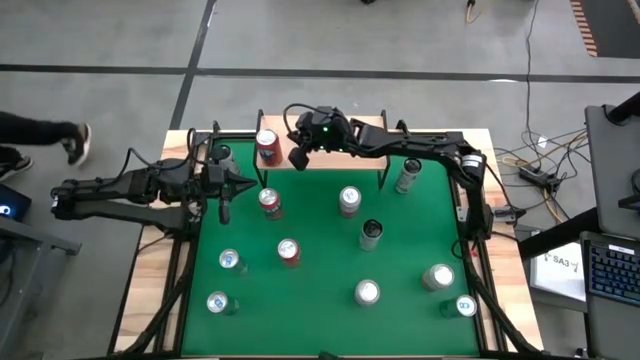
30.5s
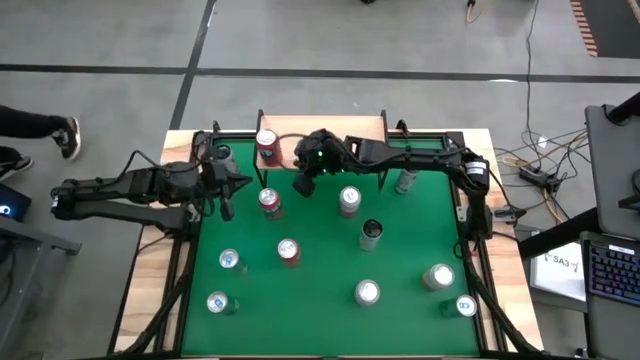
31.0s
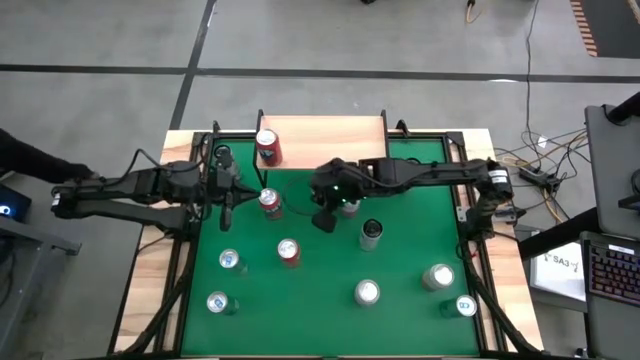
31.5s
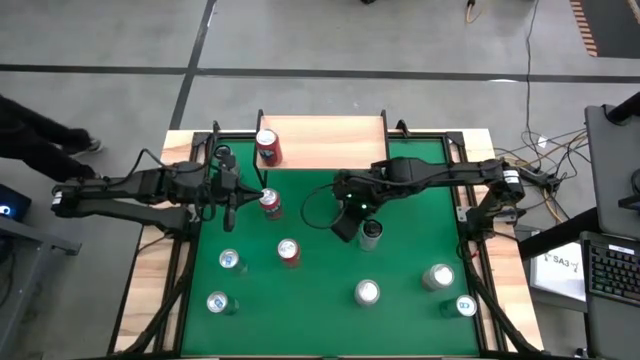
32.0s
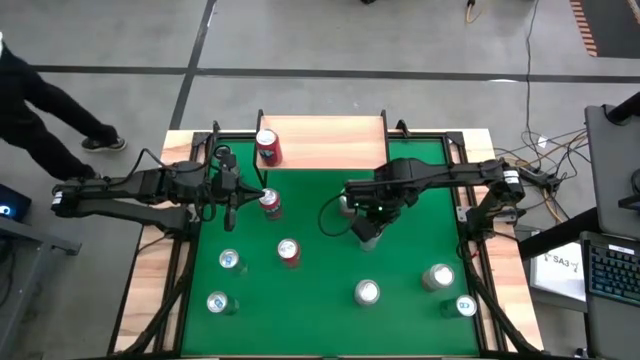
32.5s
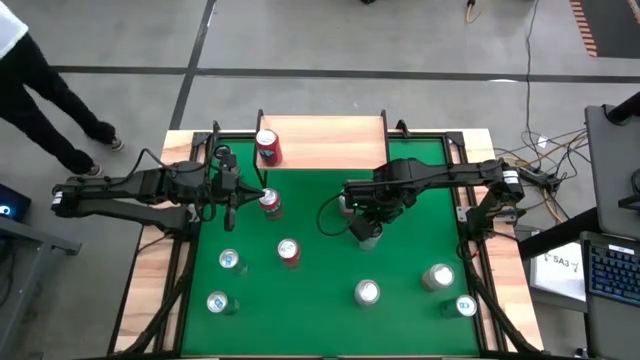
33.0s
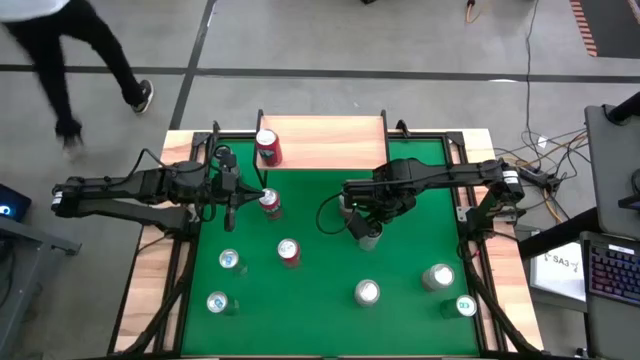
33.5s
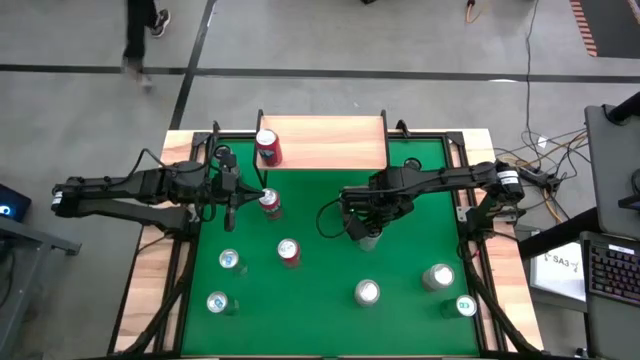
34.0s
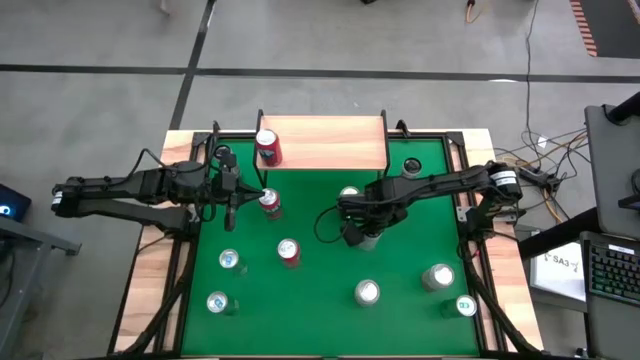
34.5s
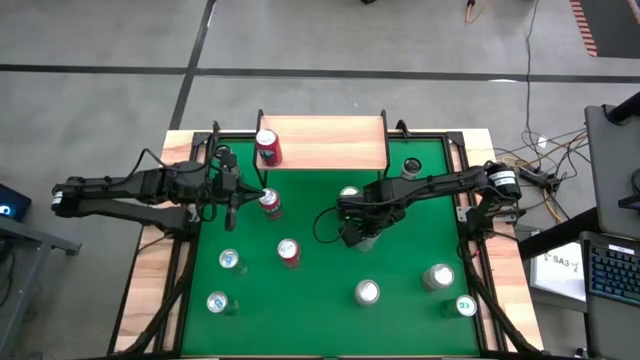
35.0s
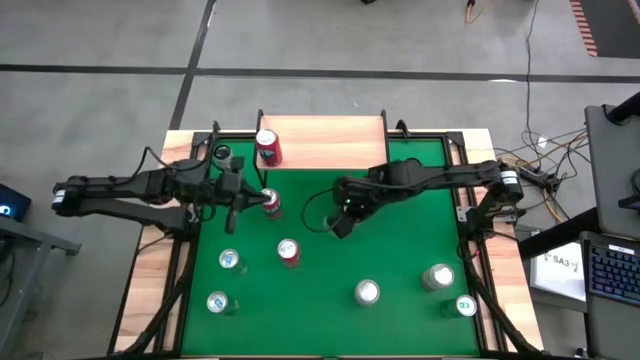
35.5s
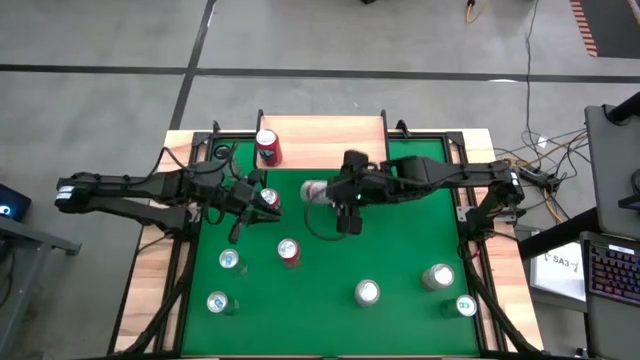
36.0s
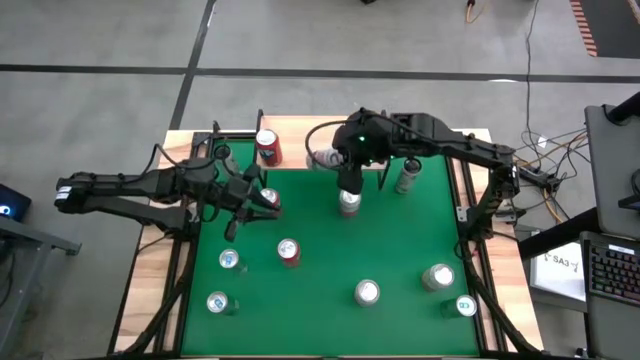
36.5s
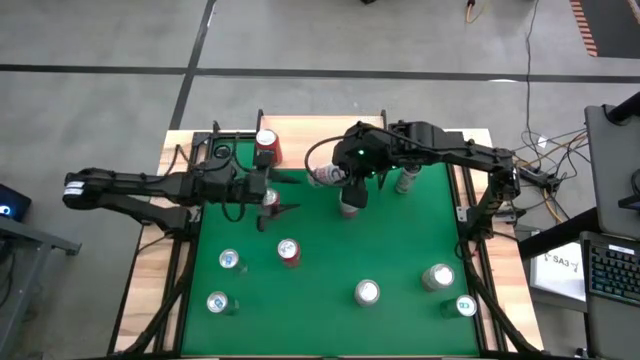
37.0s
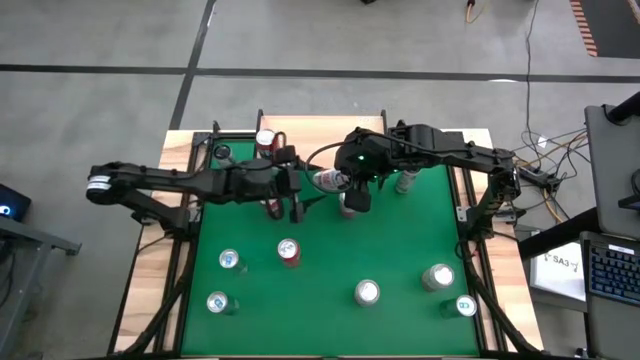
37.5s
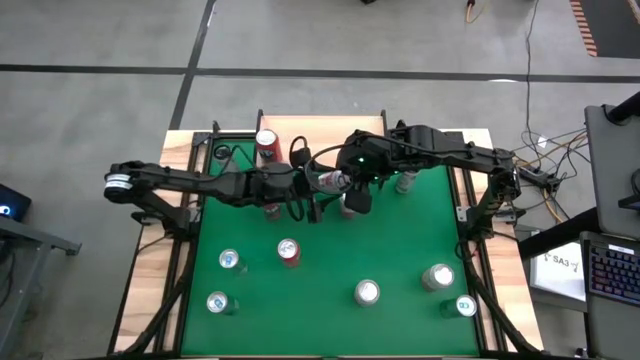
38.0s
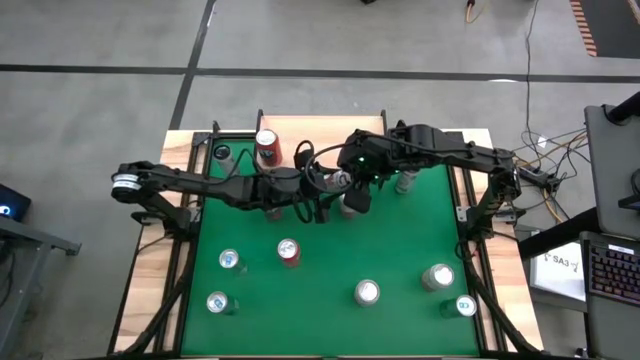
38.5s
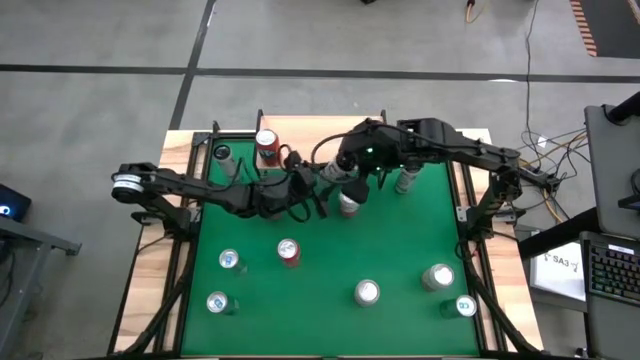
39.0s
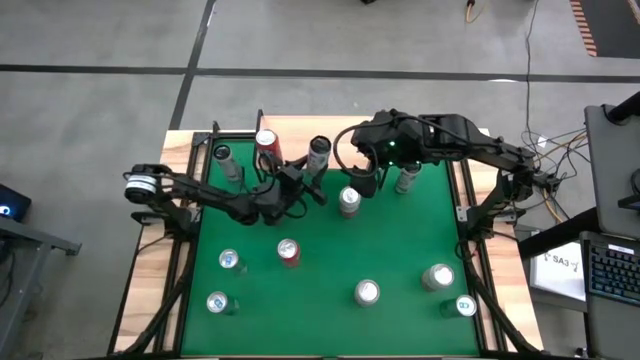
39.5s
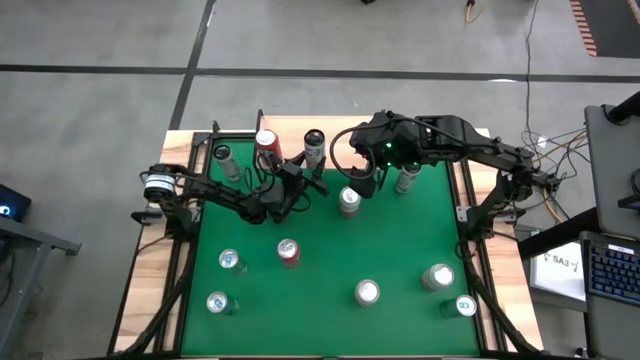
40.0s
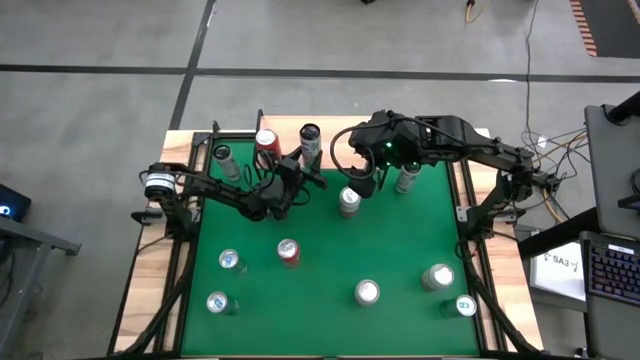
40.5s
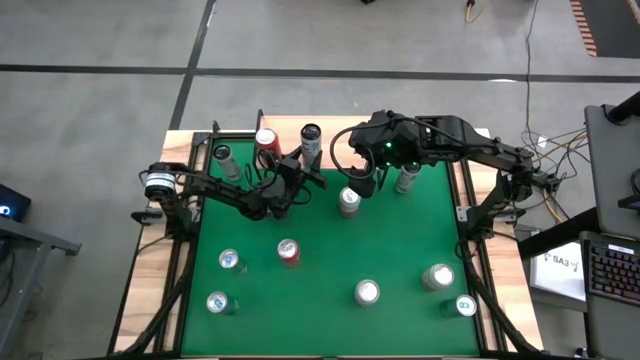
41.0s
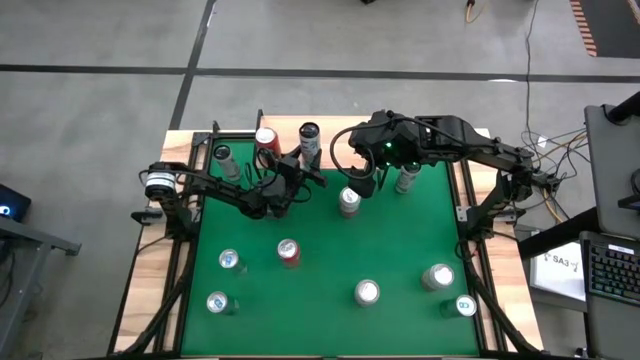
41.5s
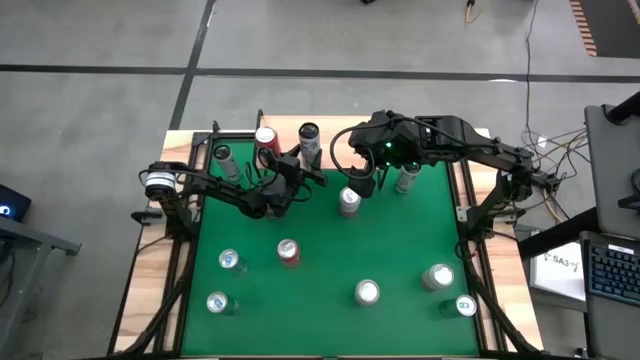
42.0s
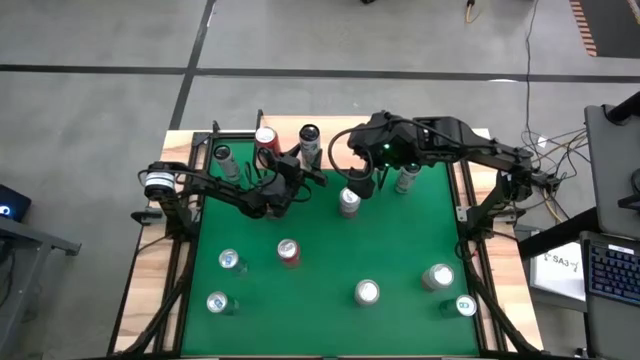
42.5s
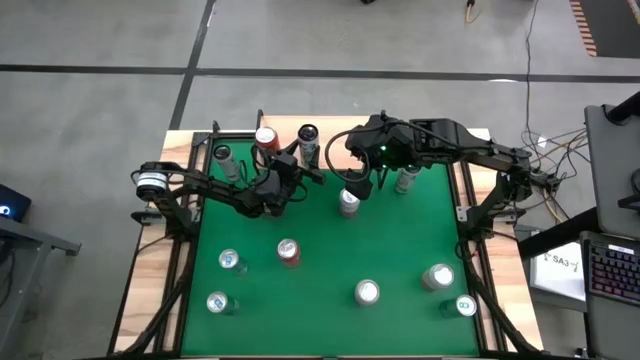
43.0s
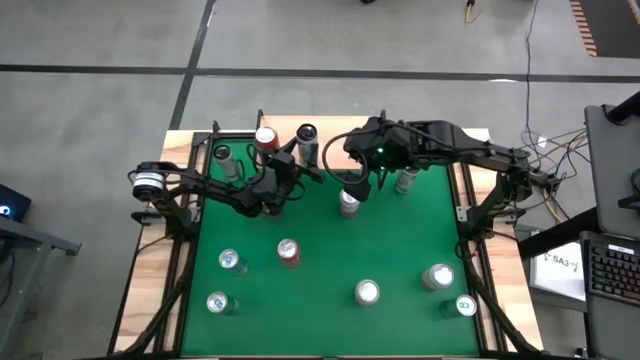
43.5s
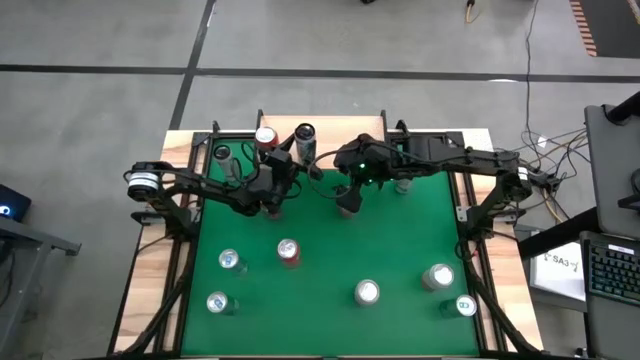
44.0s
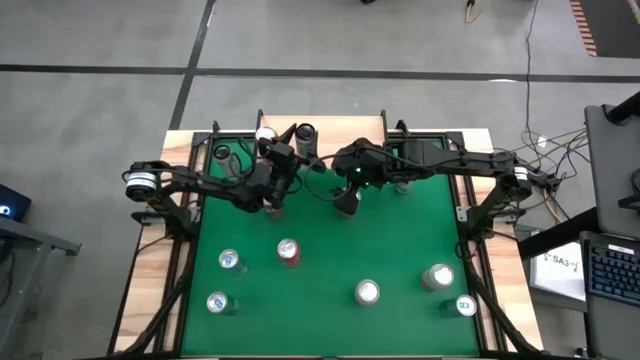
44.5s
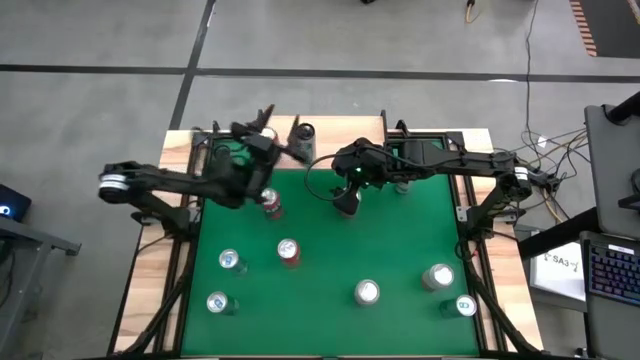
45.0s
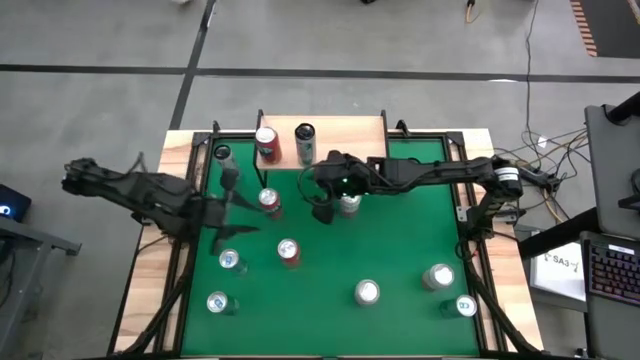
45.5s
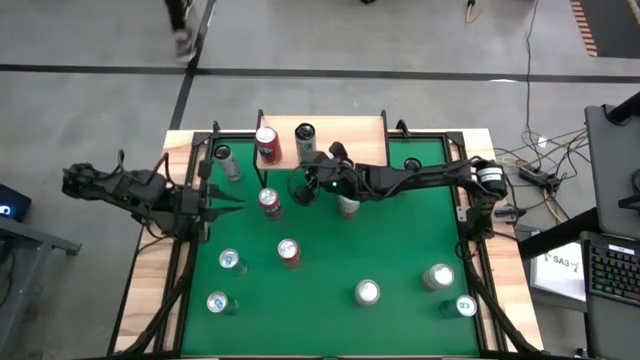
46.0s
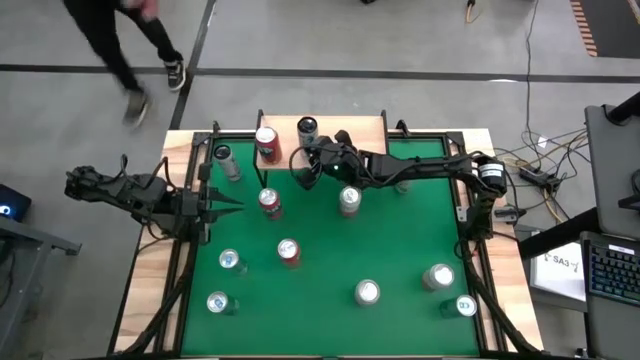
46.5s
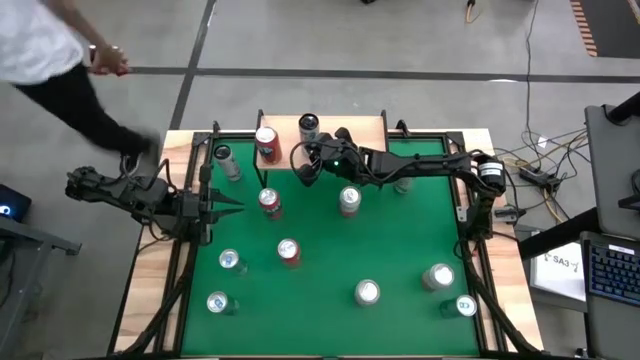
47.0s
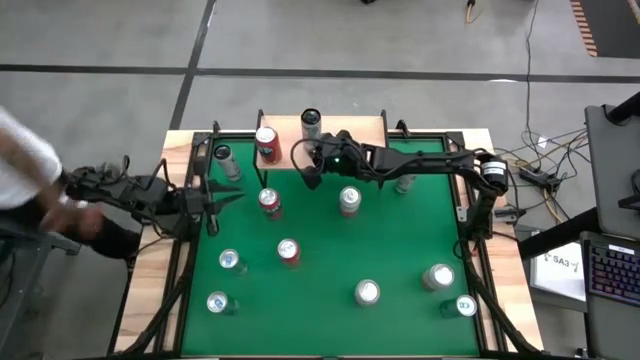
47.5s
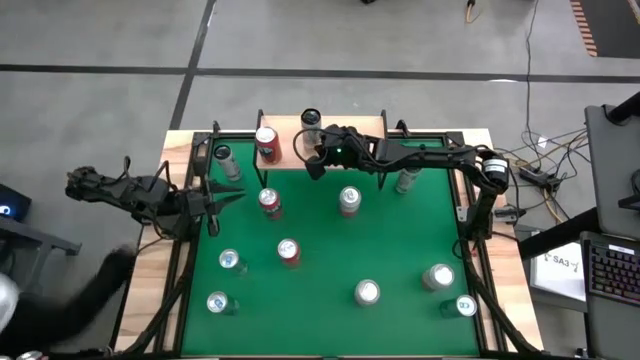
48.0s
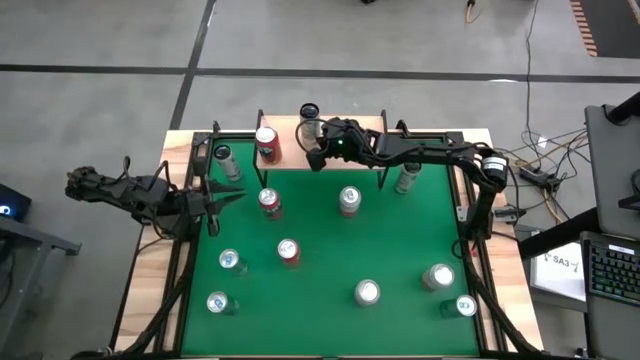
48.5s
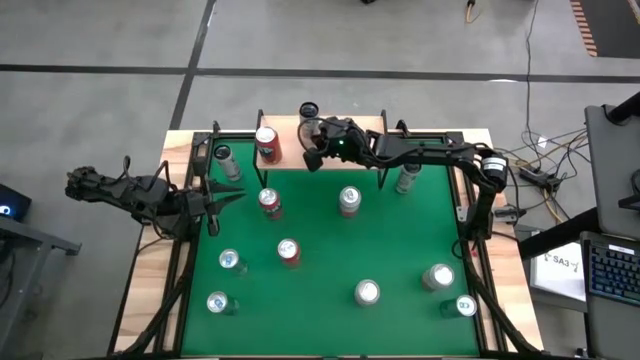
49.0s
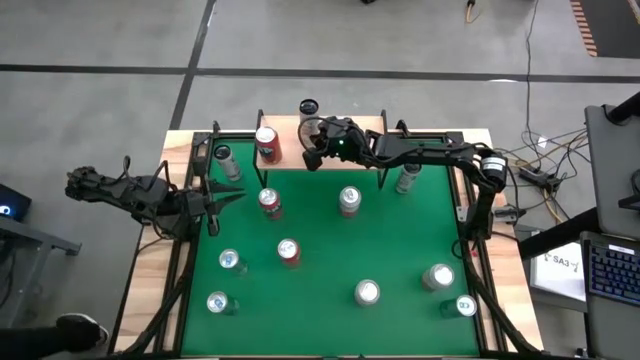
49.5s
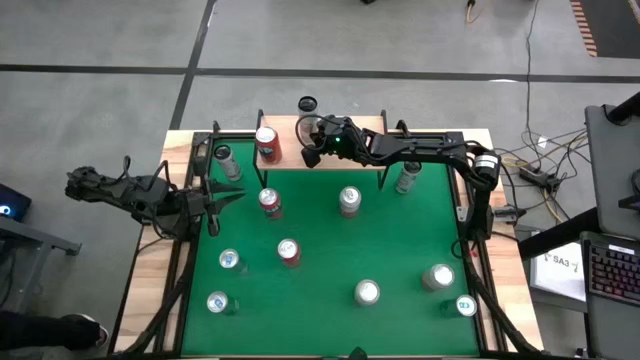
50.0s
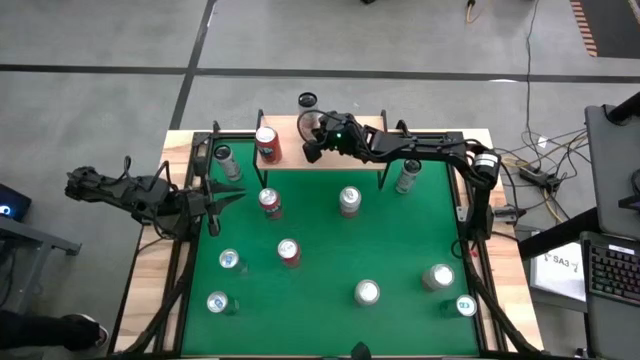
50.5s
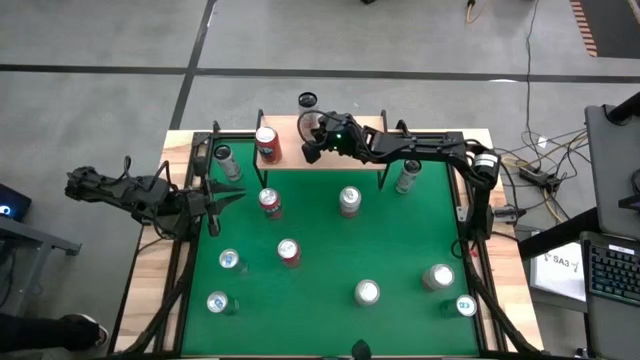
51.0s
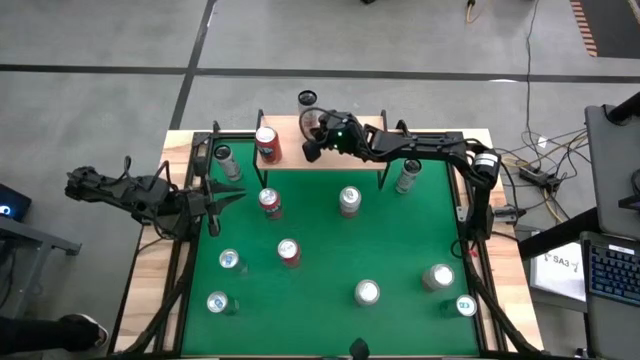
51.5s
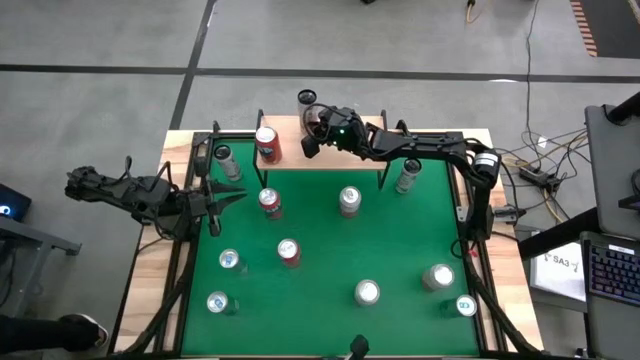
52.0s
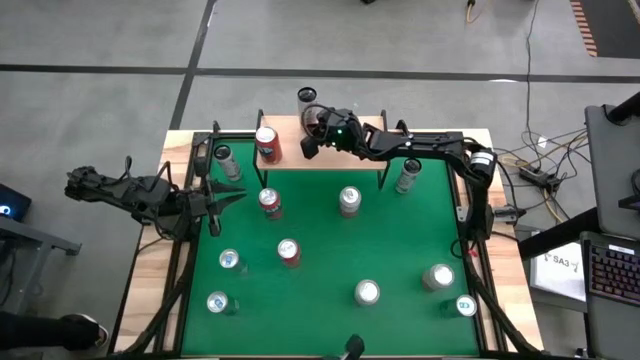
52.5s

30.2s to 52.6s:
Task: Place canned beverage on shelf
Put the bottom middle white soda can on the shelf
